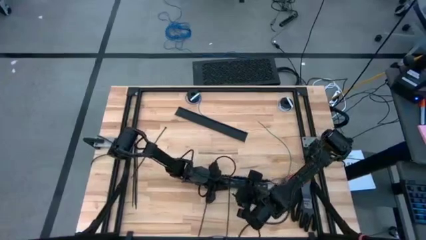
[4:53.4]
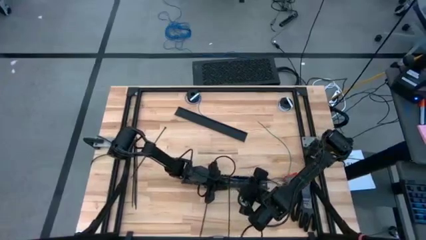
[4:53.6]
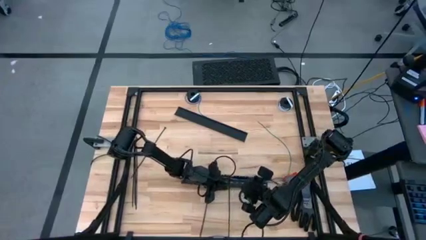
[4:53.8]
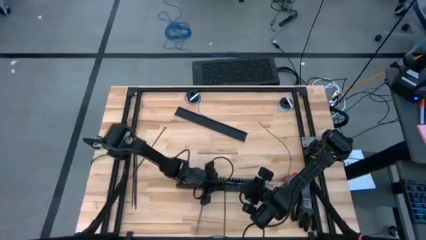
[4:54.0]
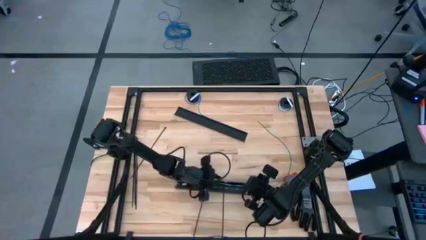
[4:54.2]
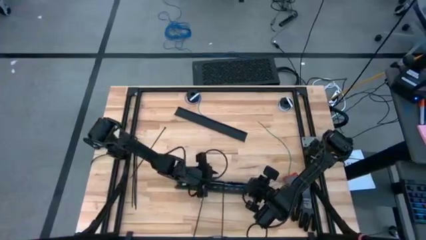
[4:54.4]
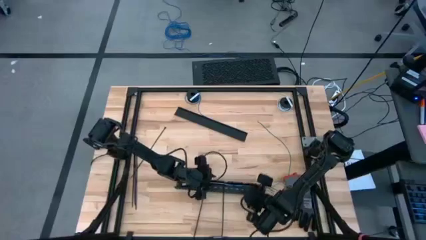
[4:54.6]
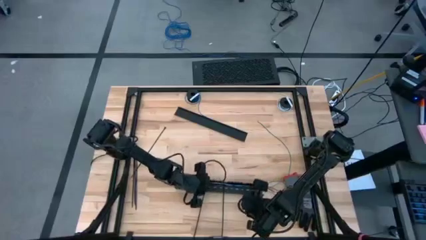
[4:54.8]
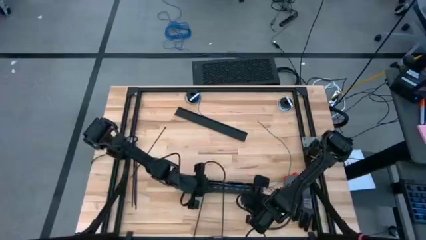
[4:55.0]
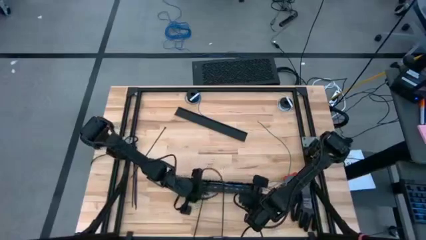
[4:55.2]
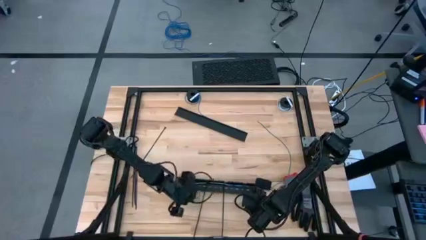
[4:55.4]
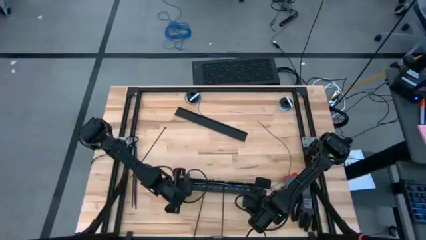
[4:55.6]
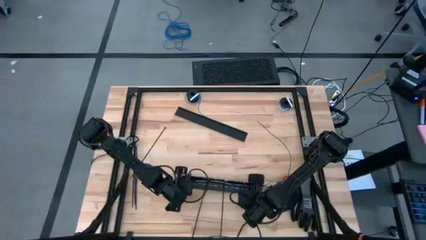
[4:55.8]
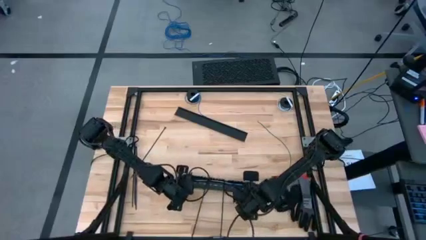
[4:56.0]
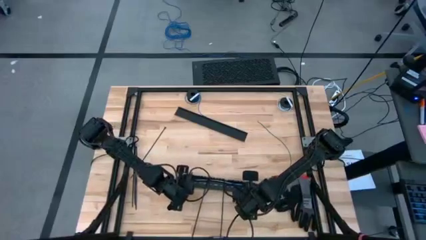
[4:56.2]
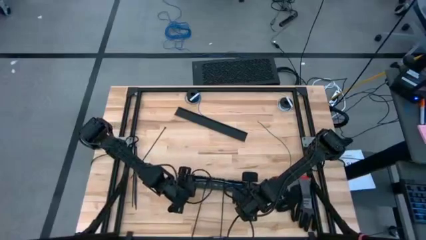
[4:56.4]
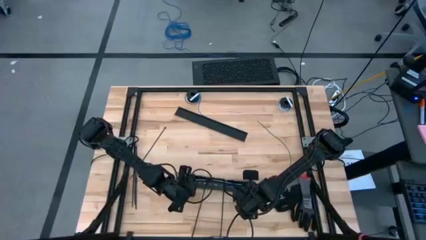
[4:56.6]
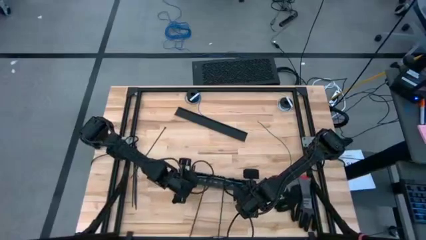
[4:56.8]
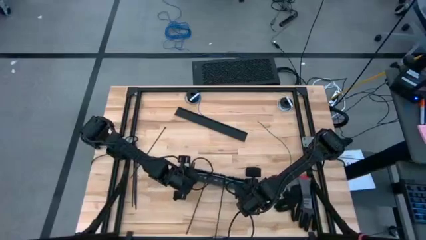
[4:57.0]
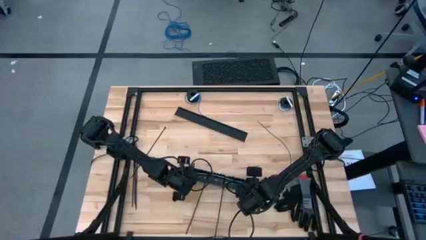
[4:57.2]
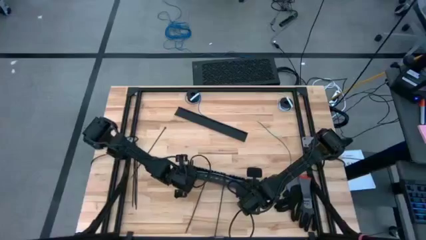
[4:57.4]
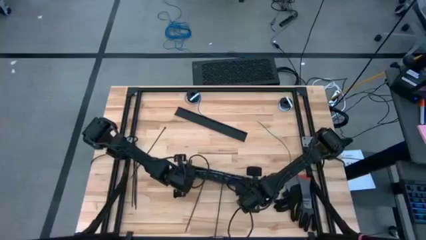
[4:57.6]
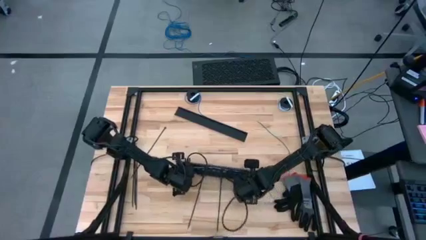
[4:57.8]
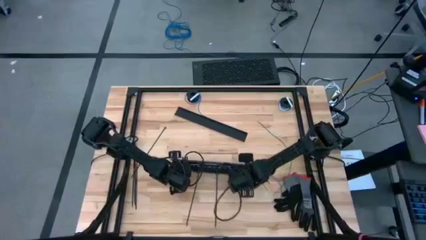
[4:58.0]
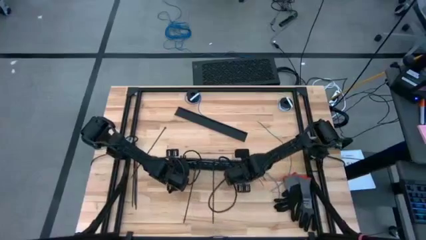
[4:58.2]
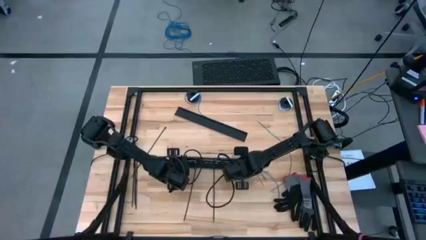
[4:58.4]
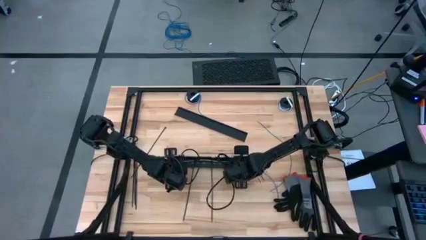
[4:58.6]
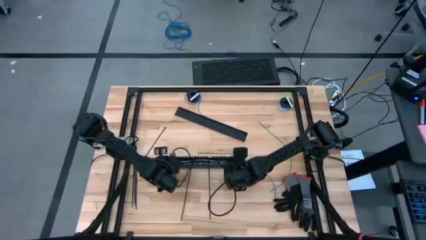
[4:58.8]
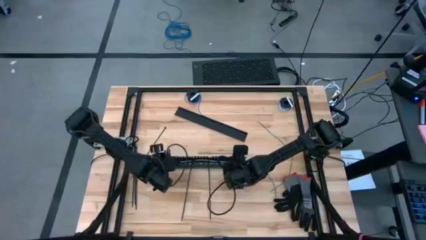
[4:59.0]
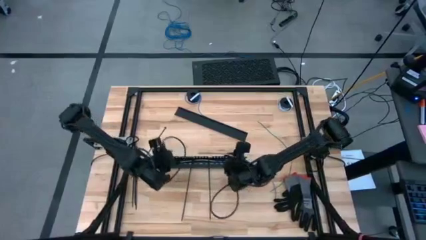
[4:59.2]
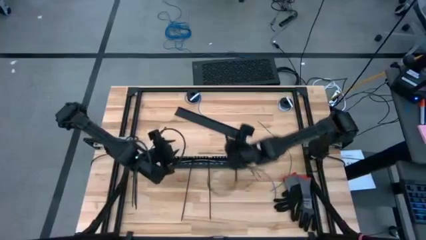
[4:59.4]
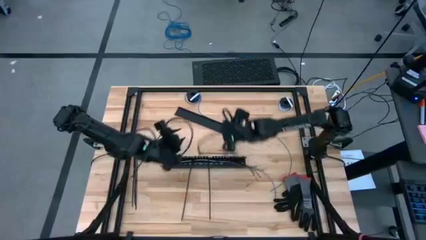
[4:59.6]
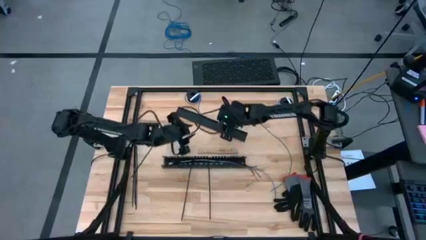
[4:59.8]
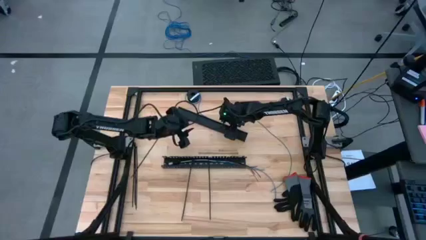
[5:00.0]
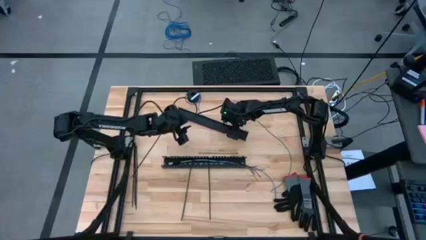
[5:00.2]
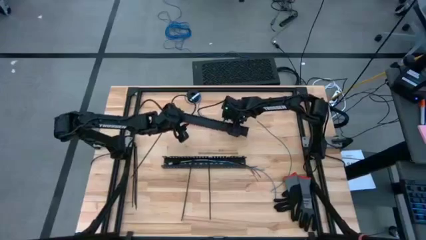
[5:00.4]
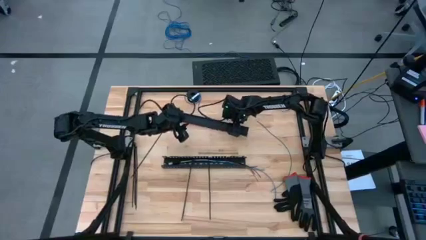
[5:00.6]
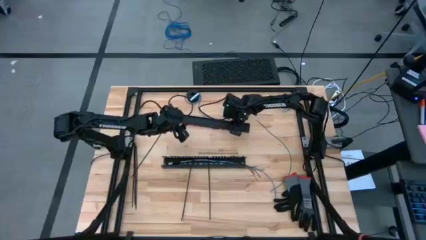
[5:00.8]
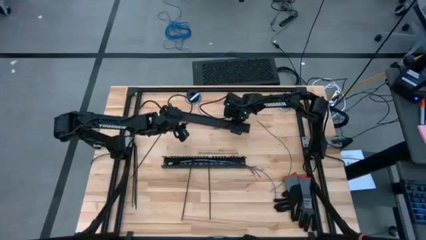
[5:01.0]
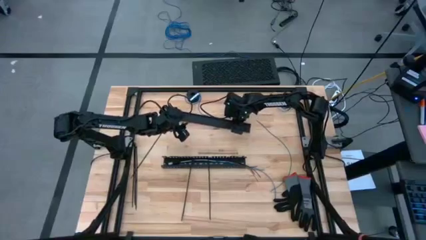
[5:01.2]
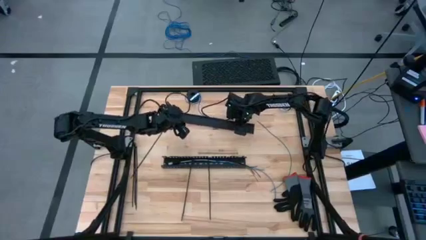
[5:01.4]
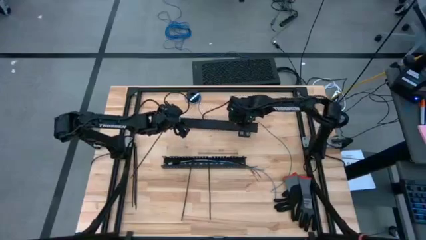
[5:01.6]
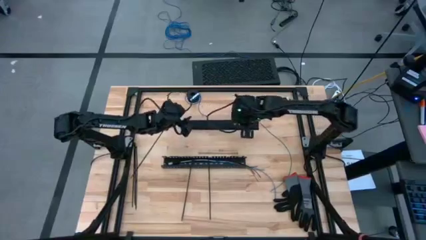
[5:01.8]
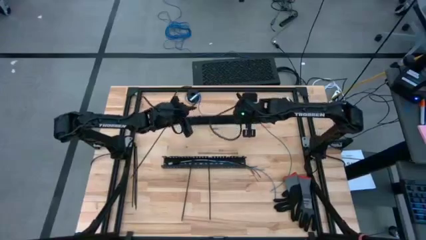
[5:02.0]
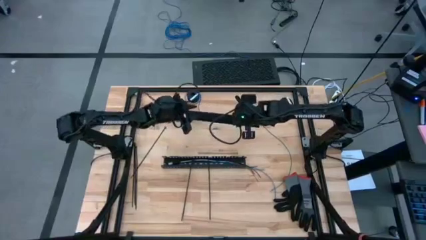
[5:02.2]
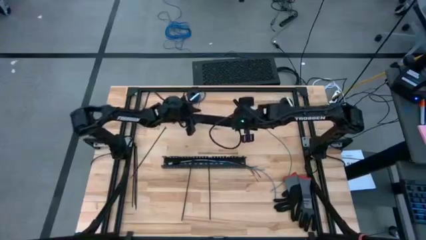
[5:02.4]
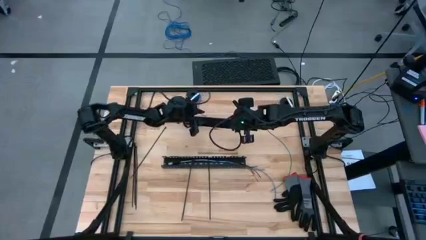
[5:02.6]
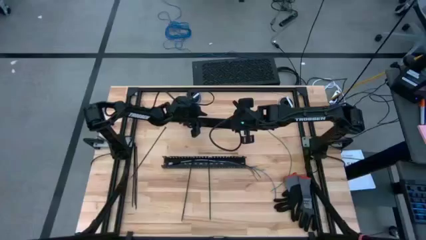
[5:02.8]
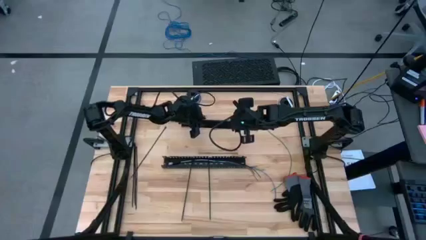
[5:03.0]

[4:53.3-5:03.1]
Task: Ziptie cables
Close the black cable duct

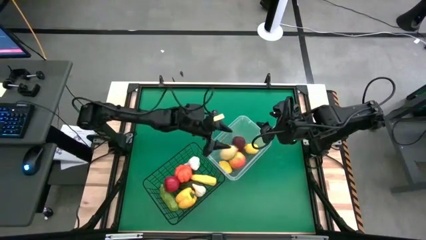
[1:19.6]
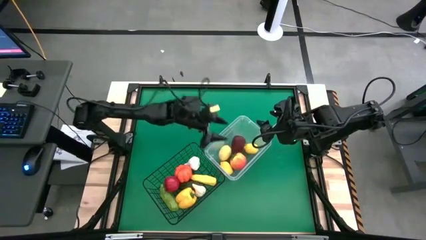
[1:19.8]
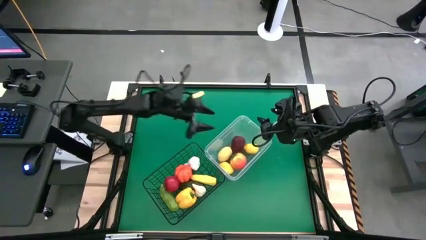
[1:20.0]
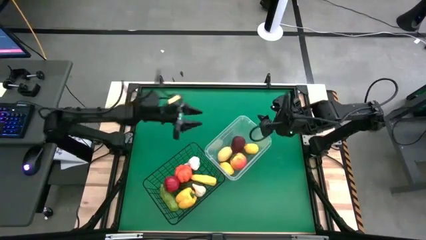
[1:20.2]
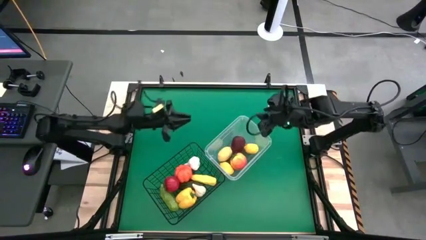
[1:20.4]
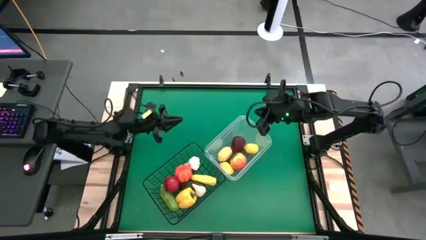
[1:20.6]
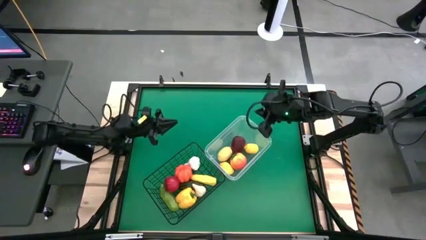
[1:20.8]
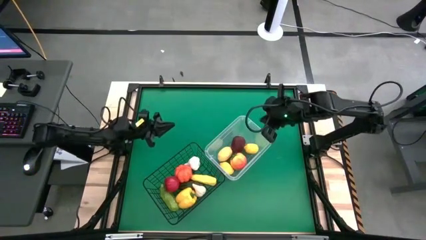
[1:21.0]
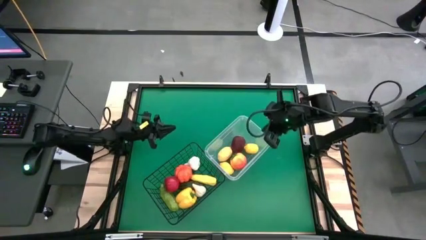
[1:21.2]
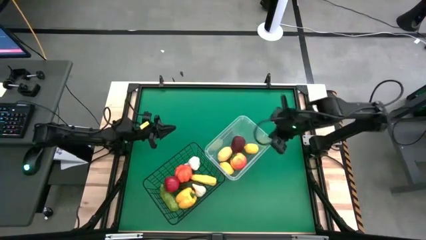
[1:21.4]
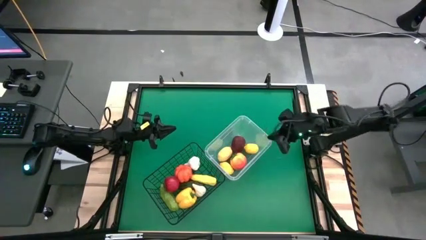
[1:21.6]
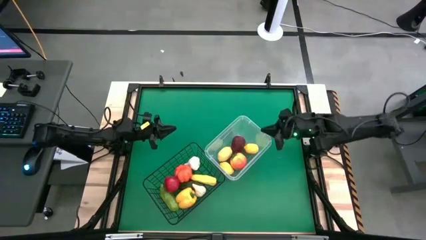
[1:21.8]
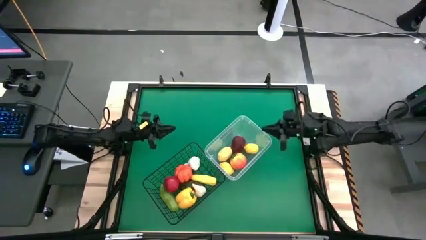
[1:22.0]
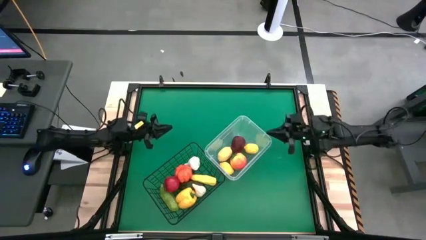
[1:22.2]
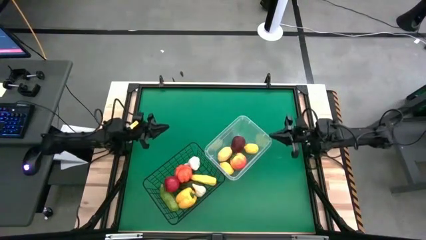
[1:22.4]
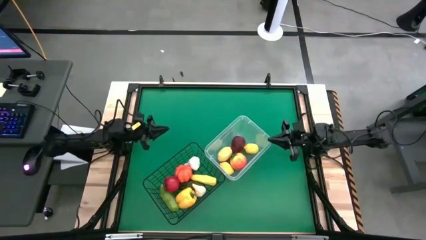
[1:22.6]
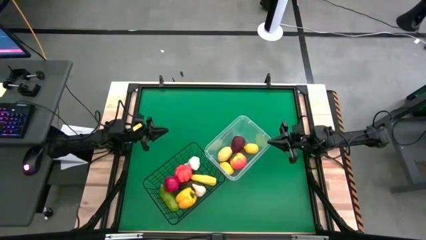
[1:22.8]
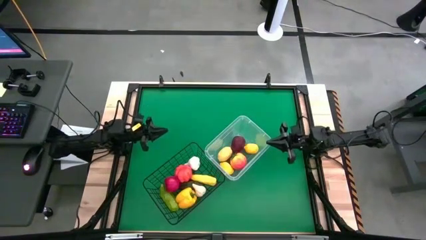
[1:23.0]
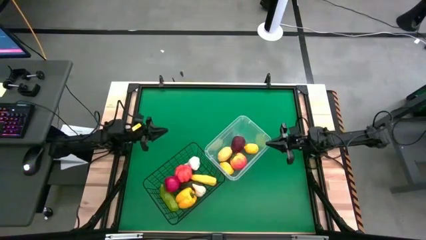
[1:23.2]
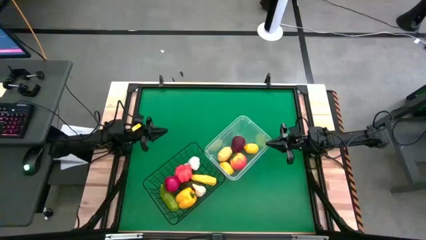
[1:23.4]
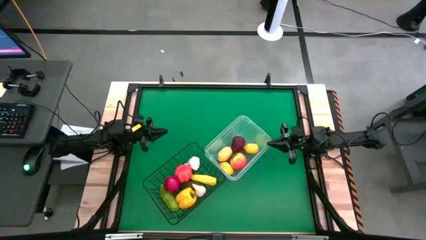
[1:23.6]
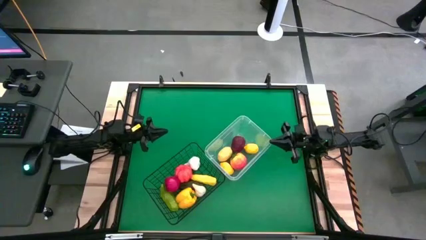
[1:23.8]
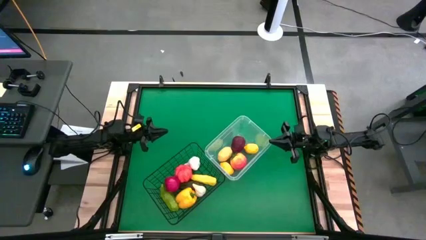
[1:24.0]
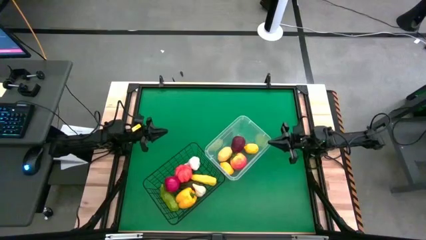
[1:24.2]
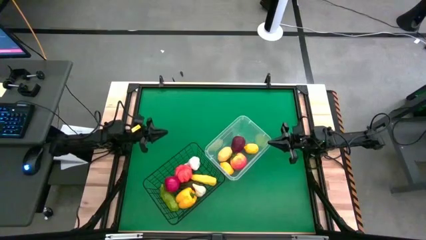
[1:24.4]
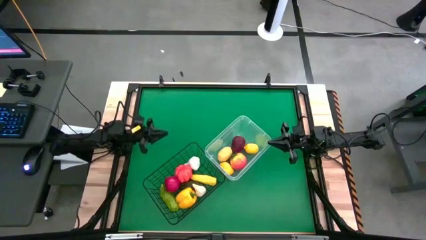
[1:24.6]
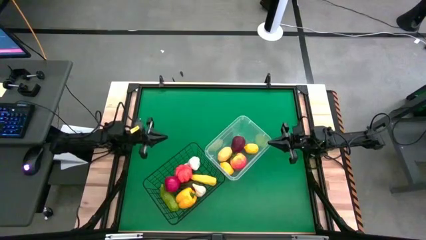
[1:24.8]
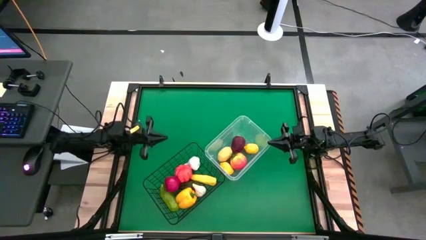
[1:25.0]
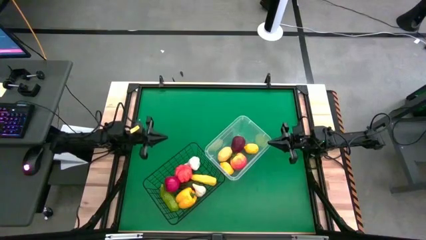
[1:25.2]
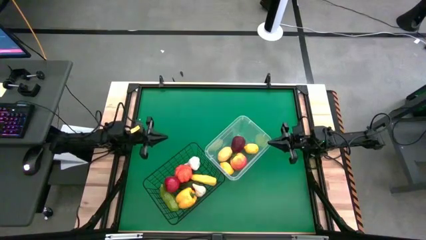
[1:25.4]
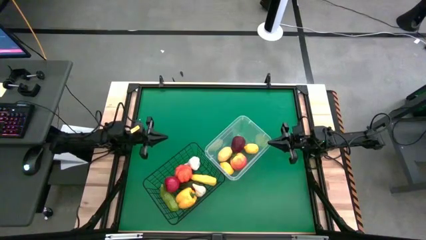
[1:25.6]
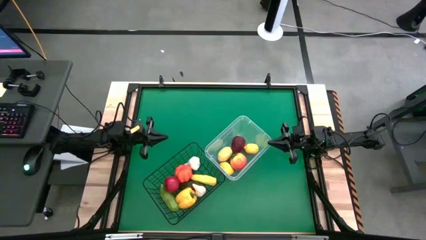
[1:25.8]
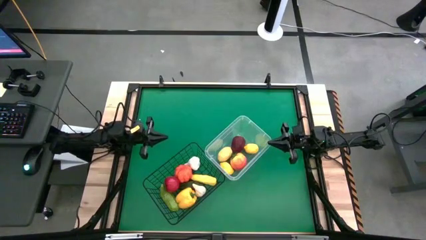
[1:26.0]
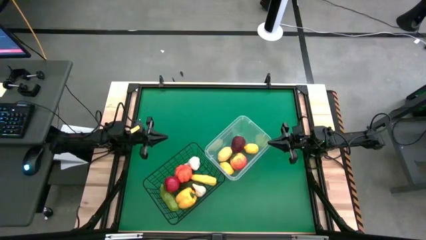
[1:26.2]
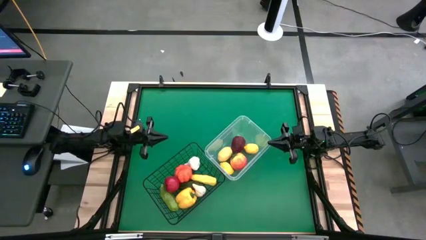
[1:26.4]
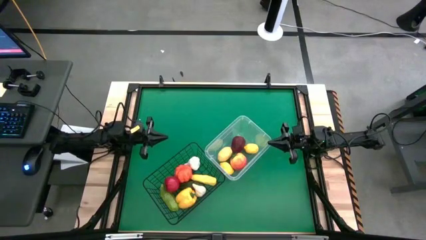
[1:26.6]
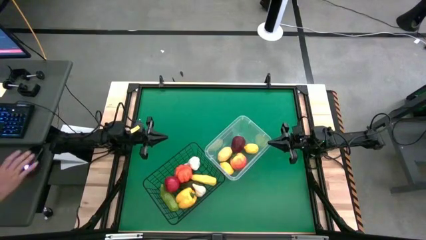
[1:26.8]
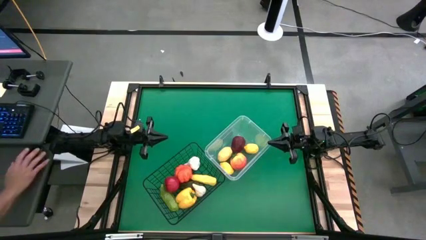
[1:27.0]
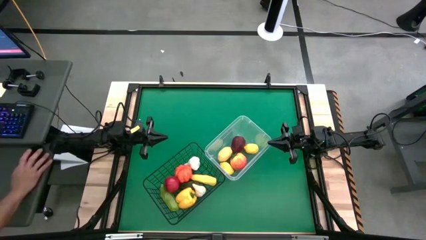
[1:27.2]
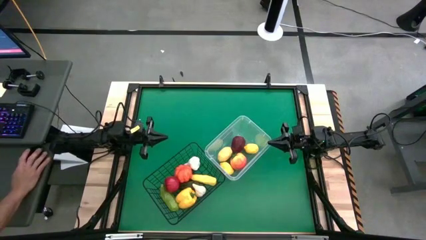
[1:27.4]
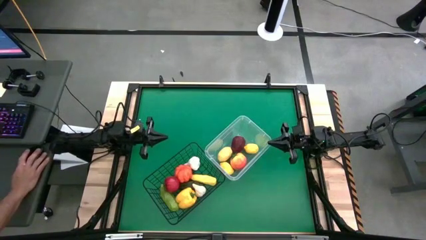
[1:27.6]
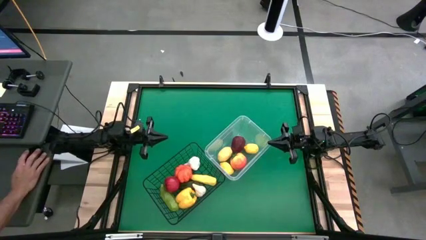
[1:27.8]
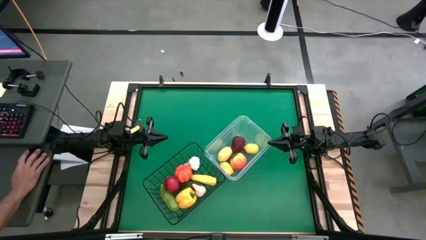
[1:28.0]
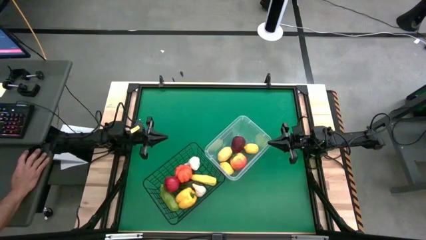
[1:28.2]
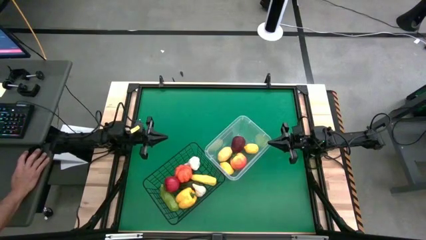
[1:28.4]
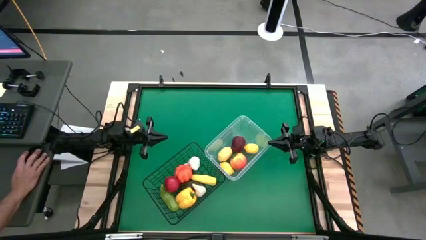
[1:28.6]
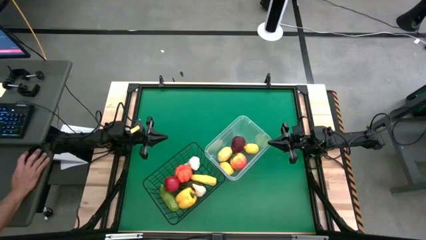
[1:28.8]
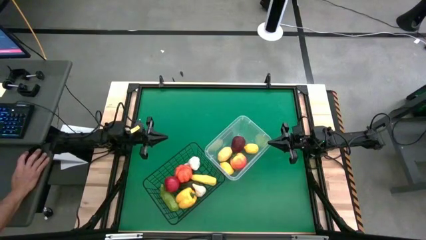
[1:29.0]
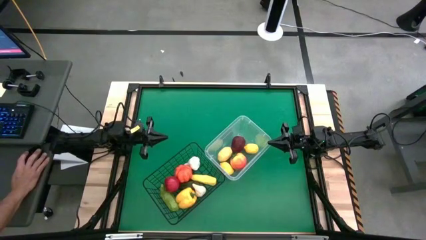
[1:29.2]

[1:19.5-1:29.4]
Task: Sort produce into baskets
Return to Home Position
